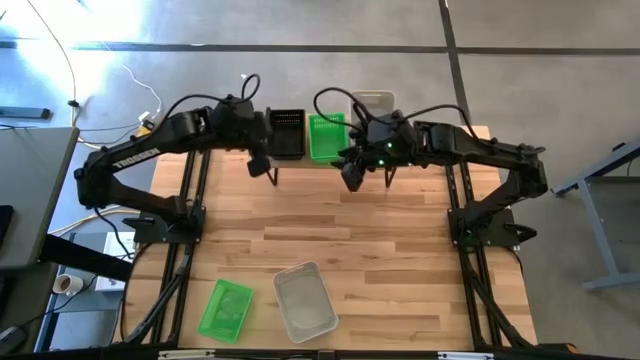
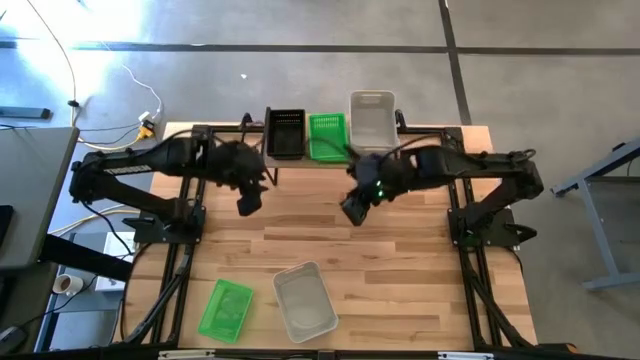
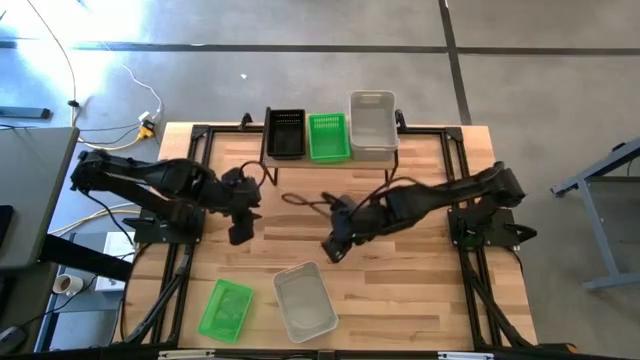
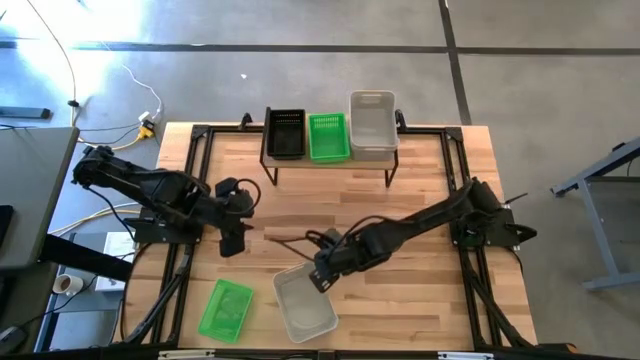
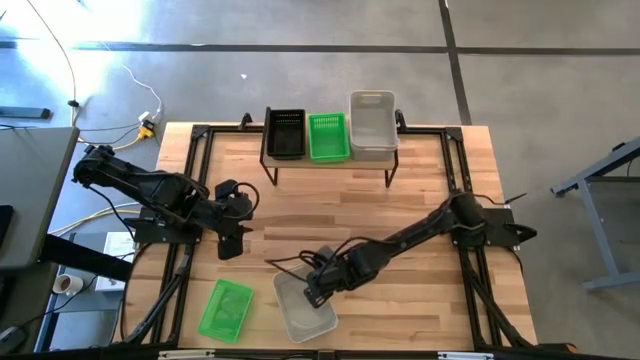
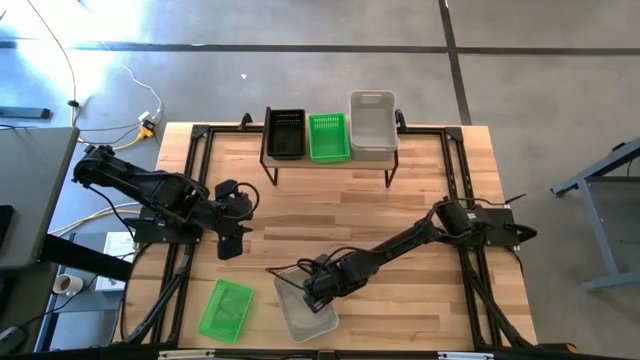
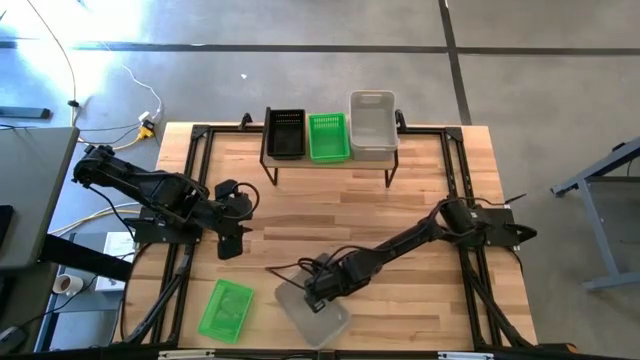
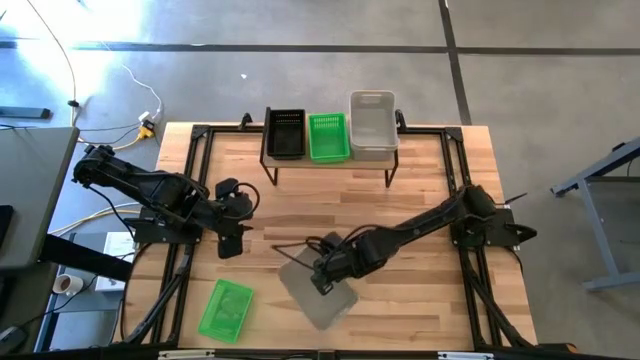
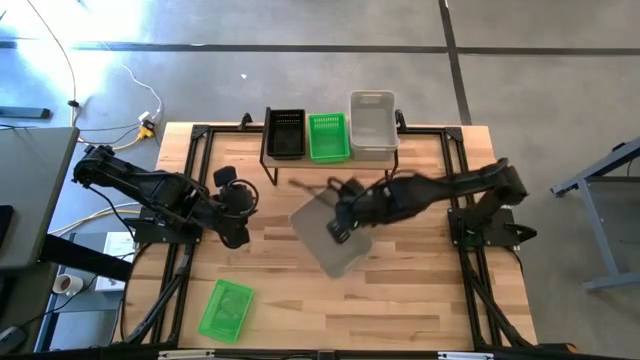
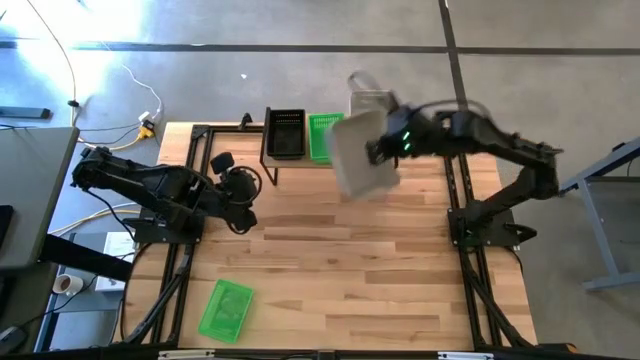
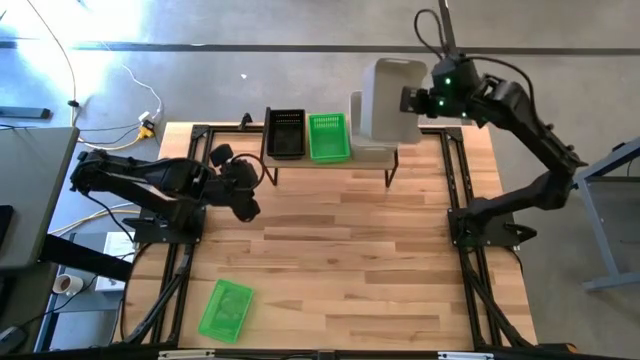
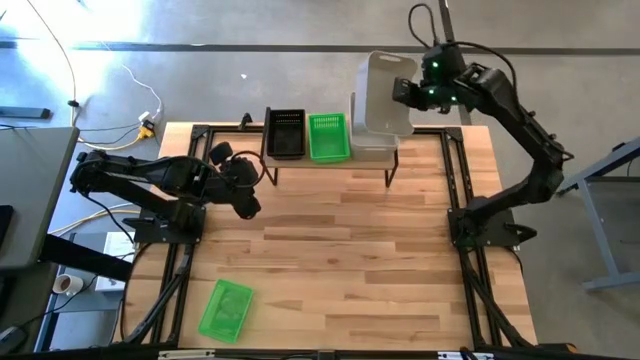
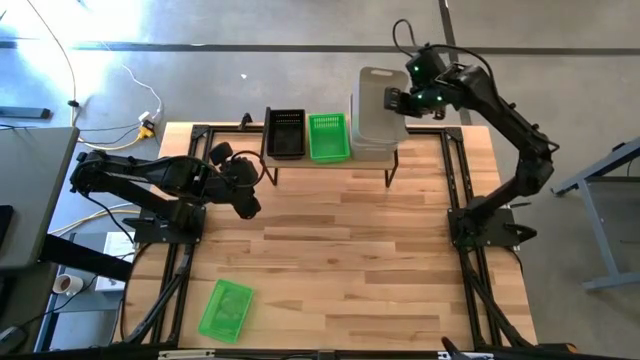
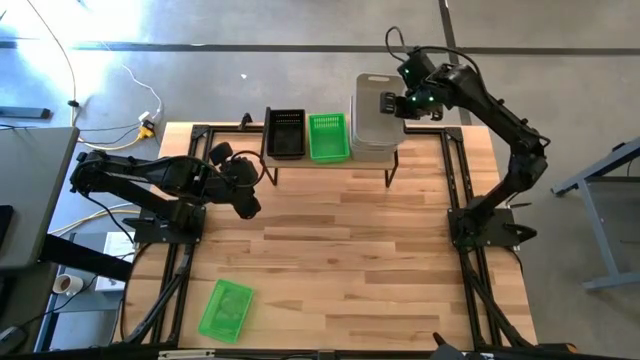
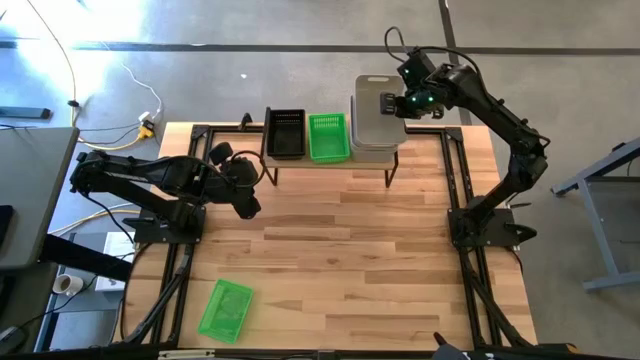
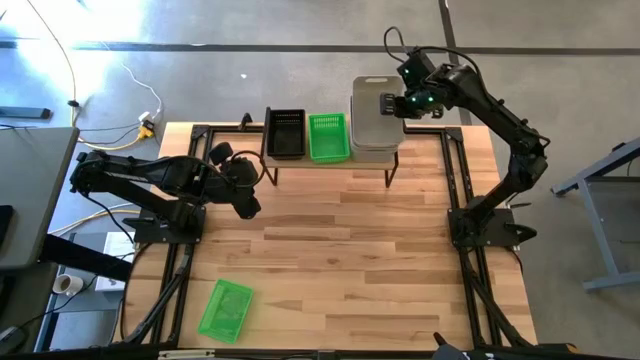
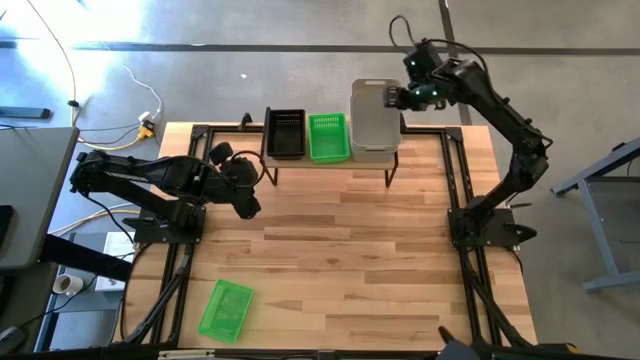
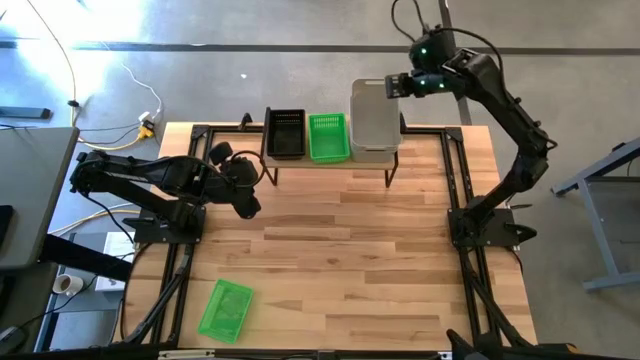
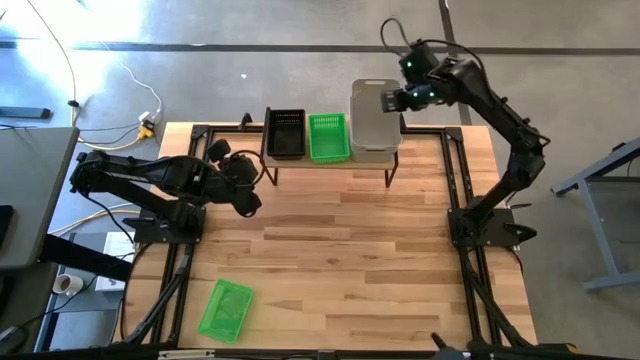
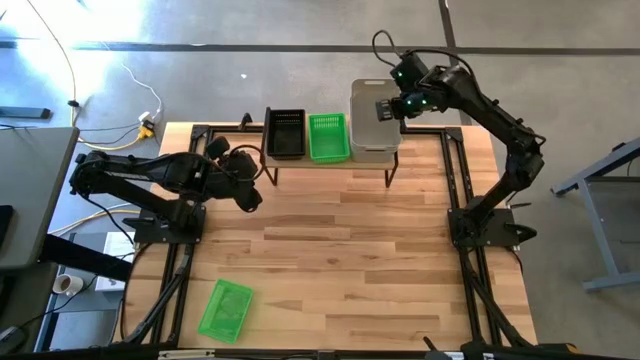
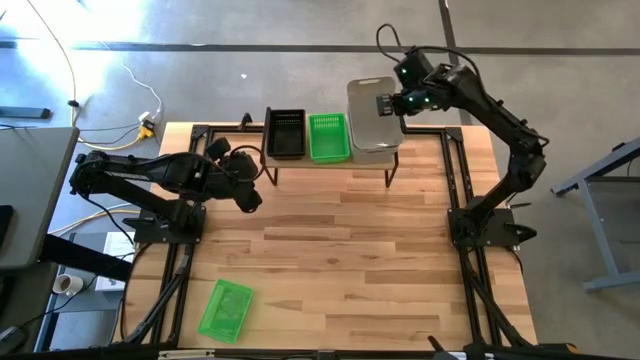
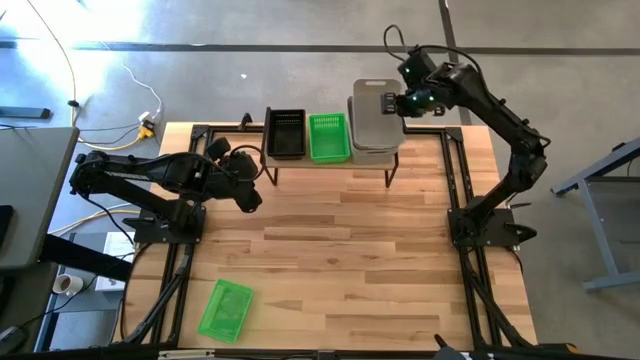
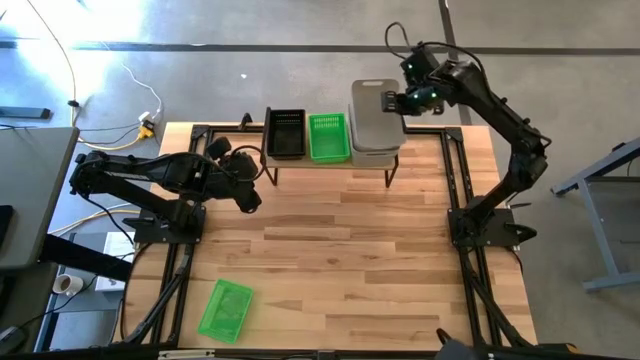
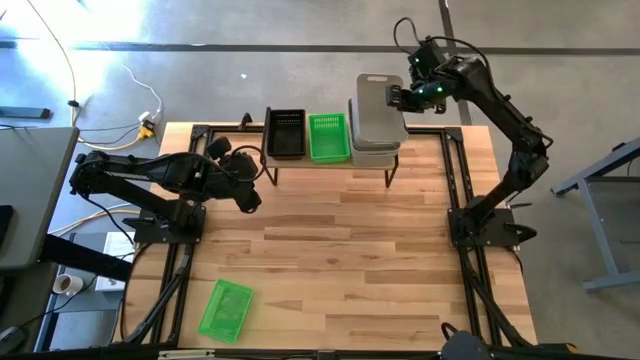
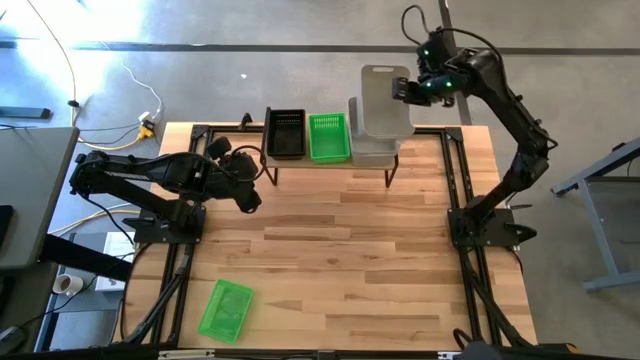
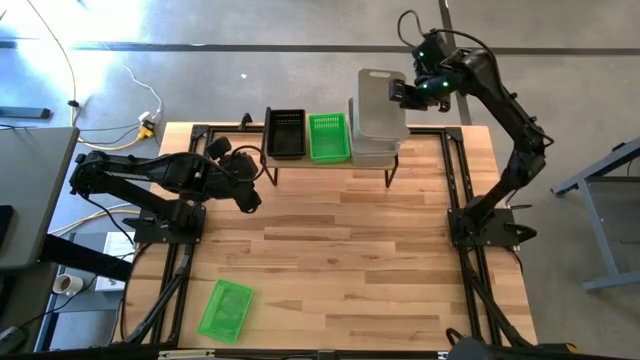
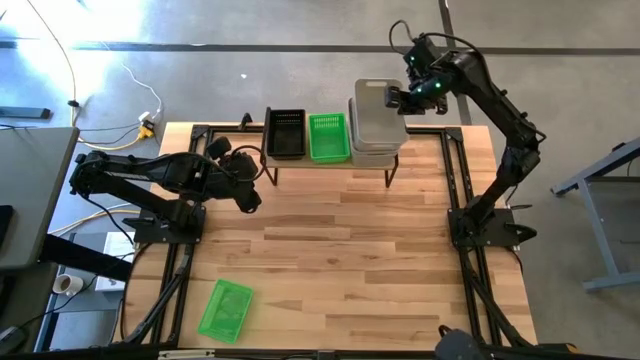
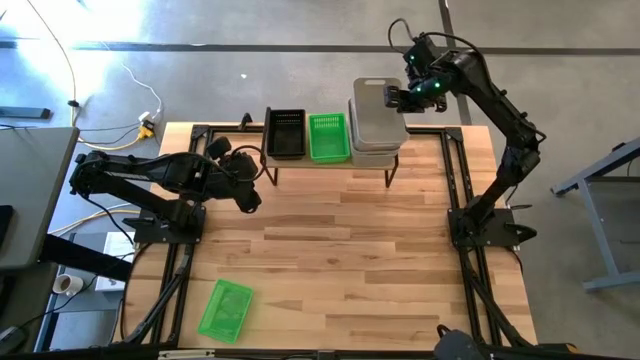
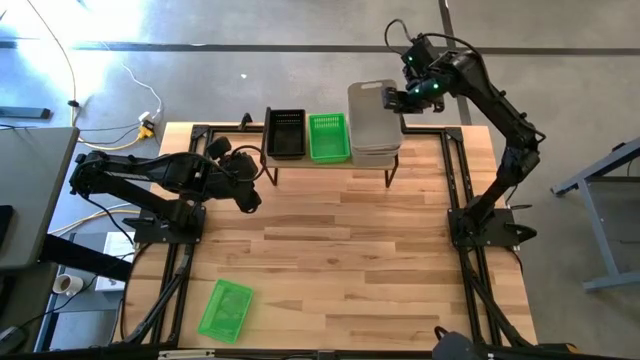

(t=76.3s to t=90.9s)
Task: Stack baskets on shelf by color
Stack the gray bin on top of the stacked gray bins on the shelf

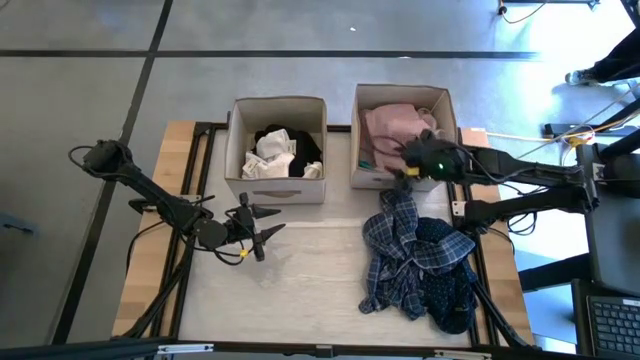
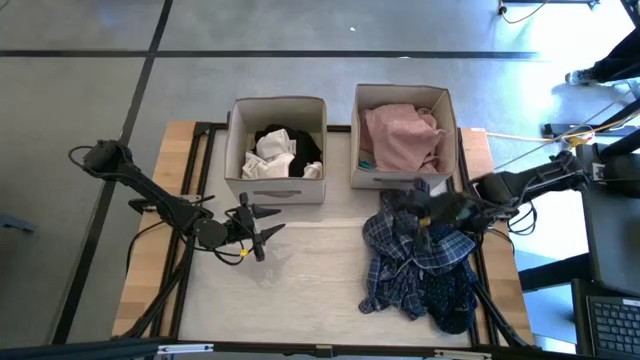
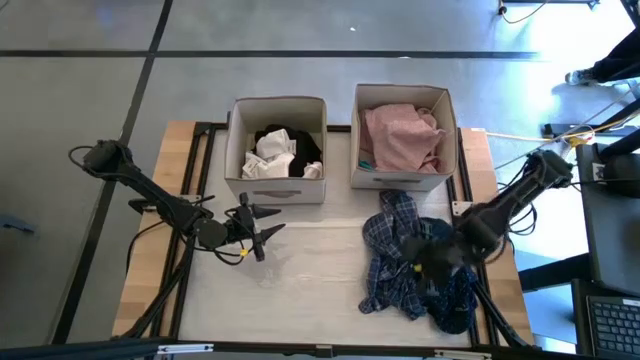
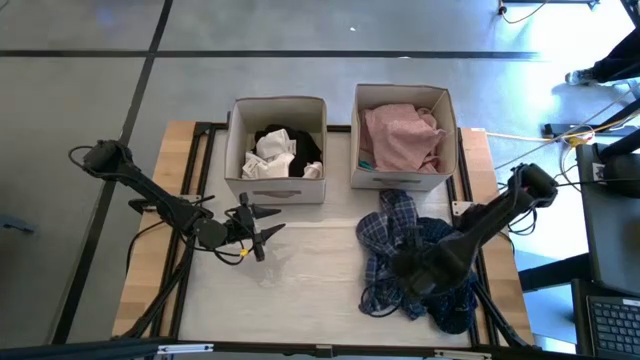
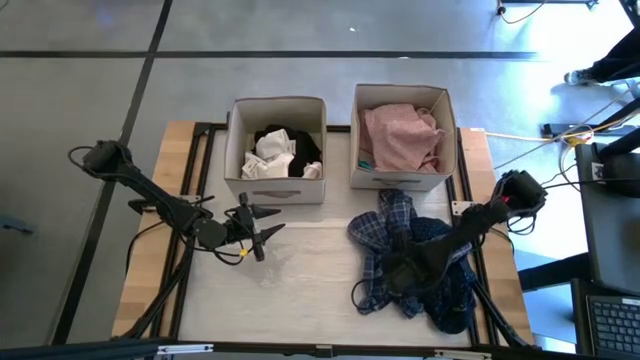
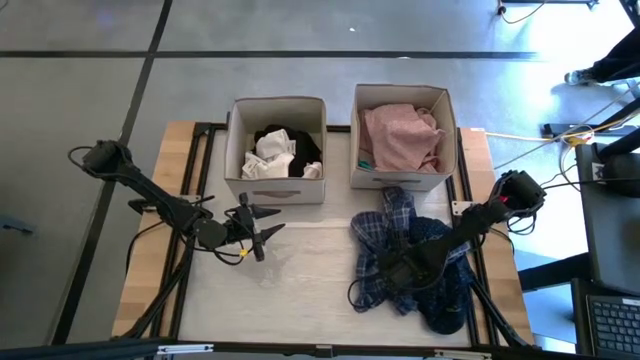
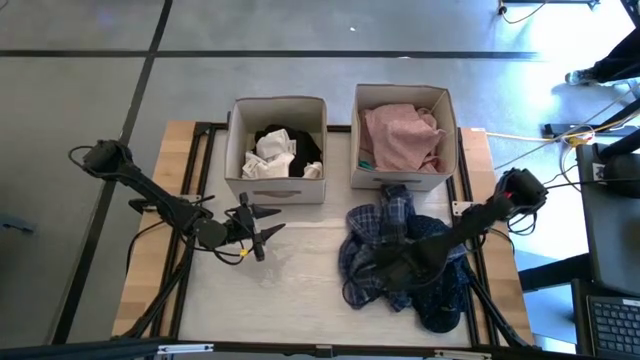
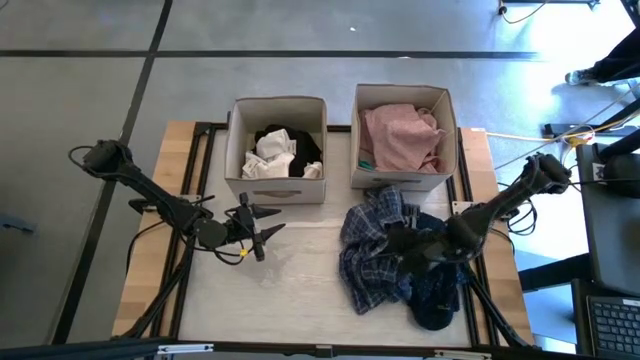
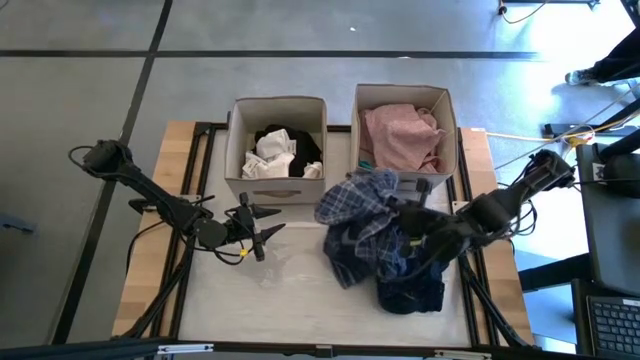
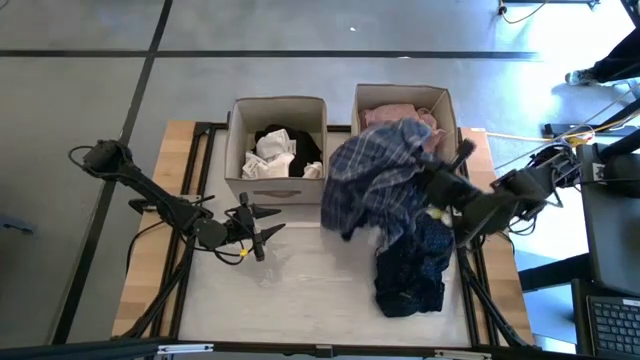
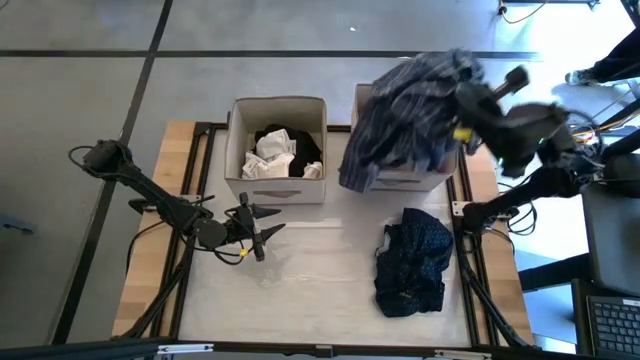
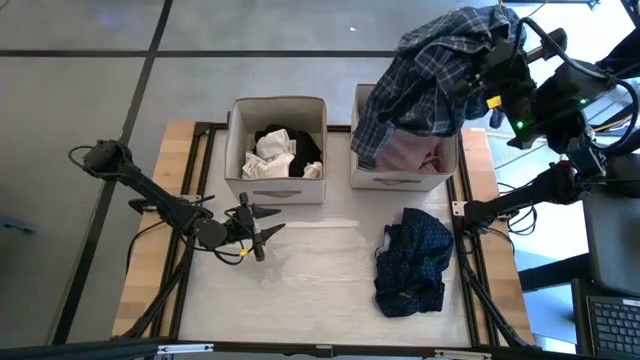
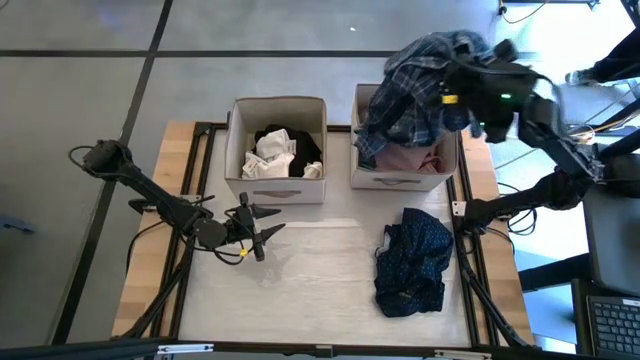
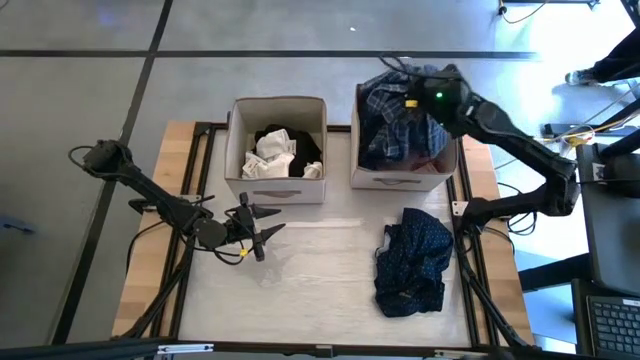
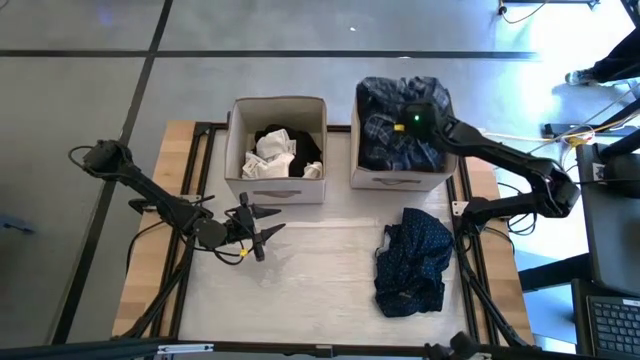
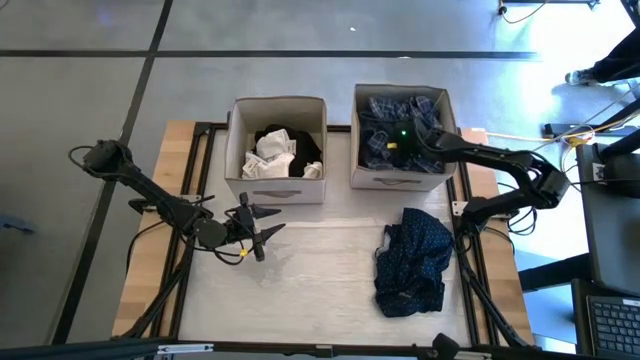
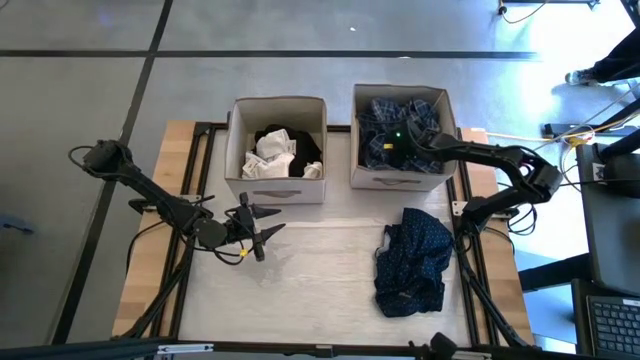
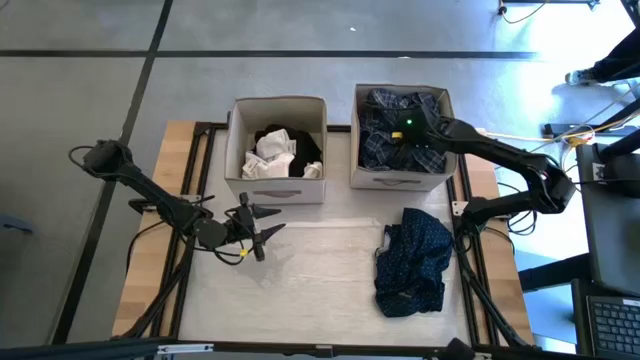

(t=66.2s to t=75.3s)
Task: Sort clothes
Put the blue pants into the right laundry organizer
